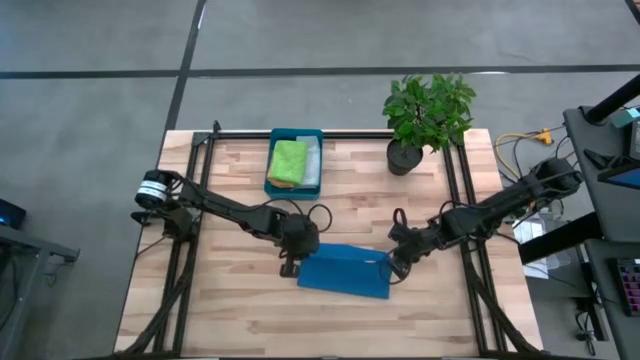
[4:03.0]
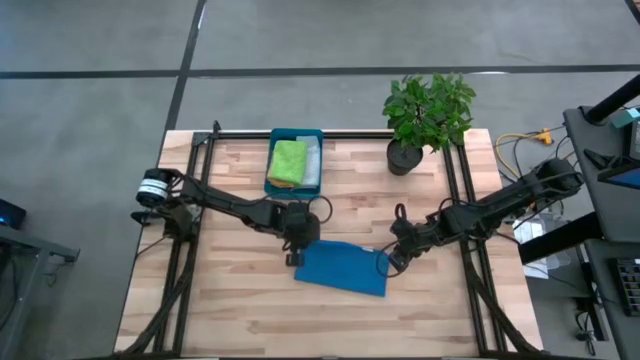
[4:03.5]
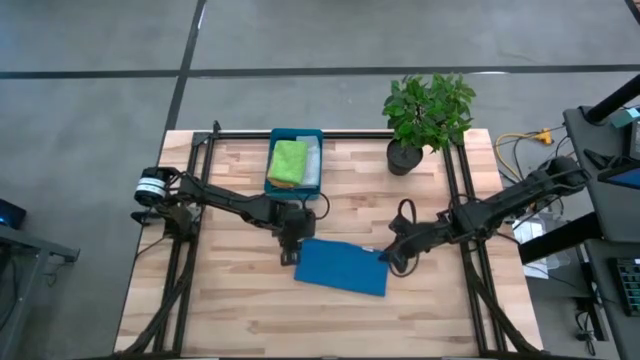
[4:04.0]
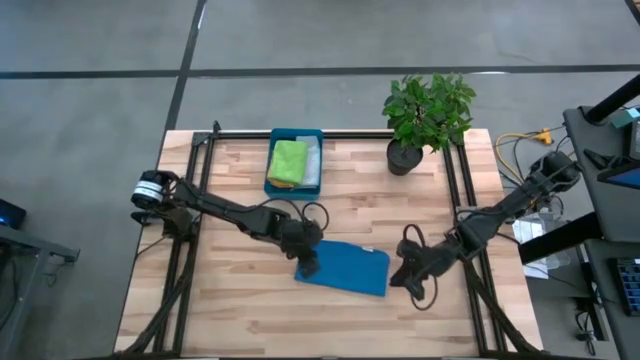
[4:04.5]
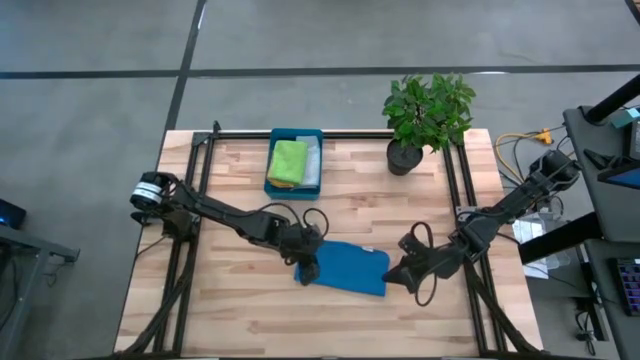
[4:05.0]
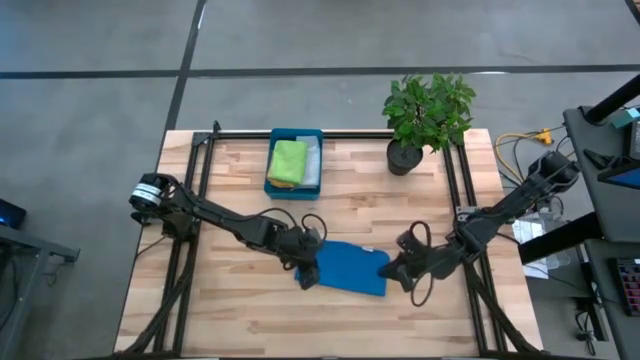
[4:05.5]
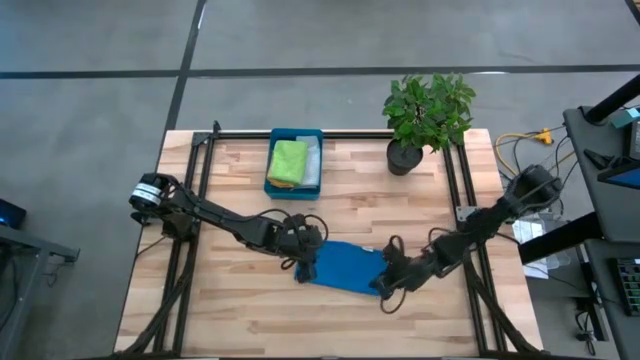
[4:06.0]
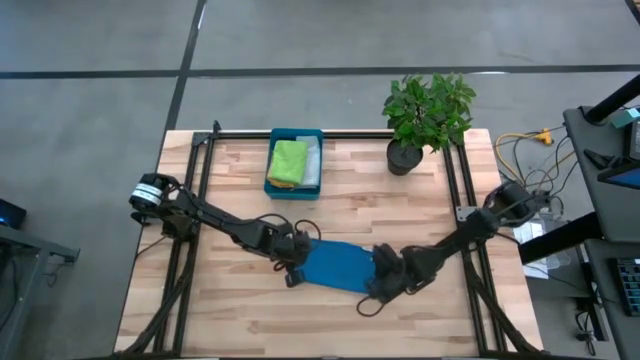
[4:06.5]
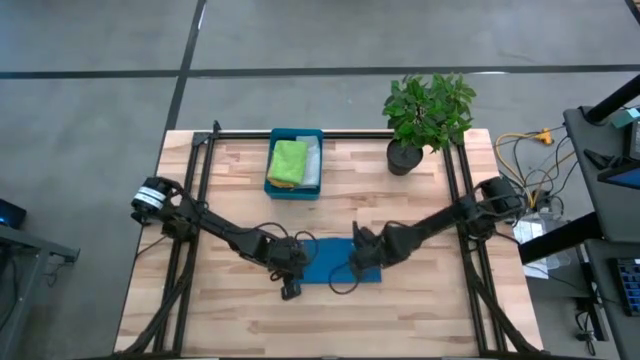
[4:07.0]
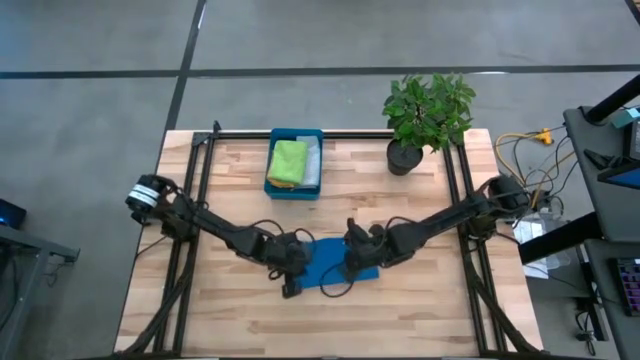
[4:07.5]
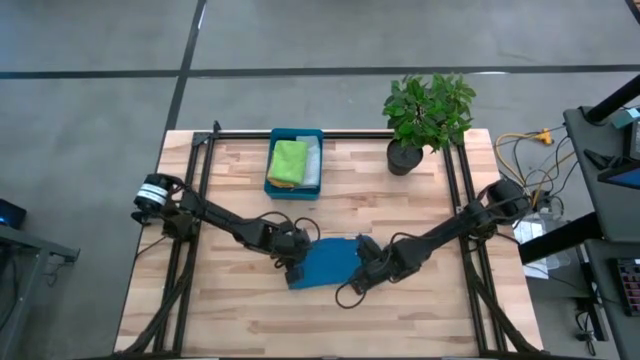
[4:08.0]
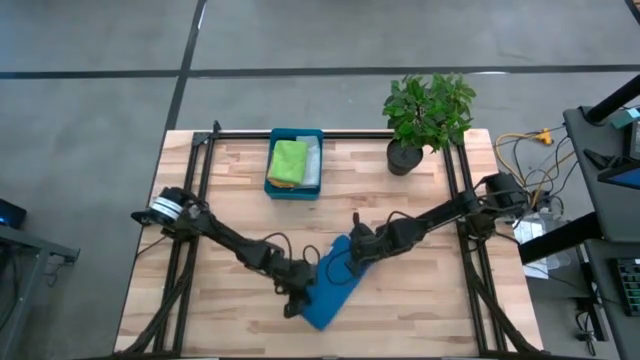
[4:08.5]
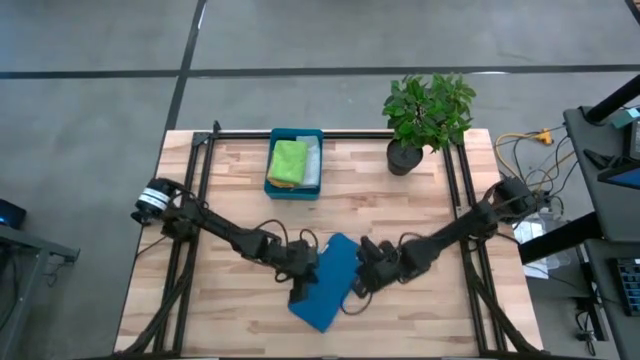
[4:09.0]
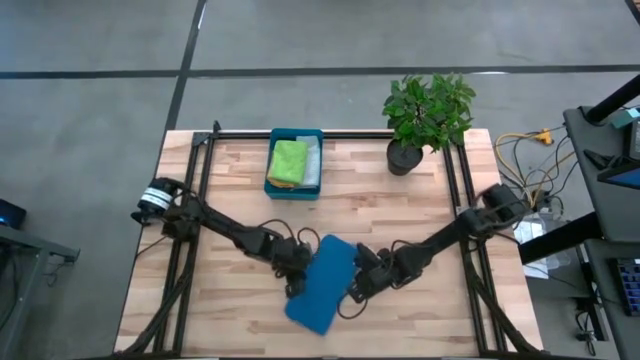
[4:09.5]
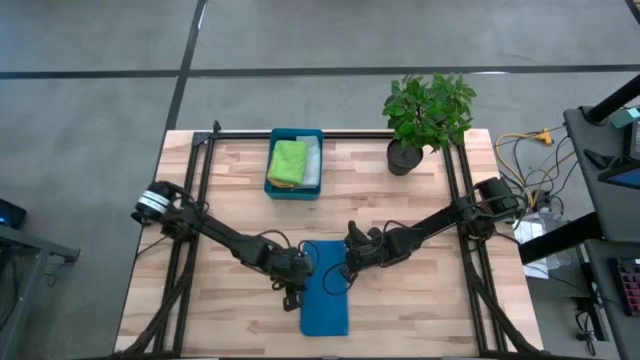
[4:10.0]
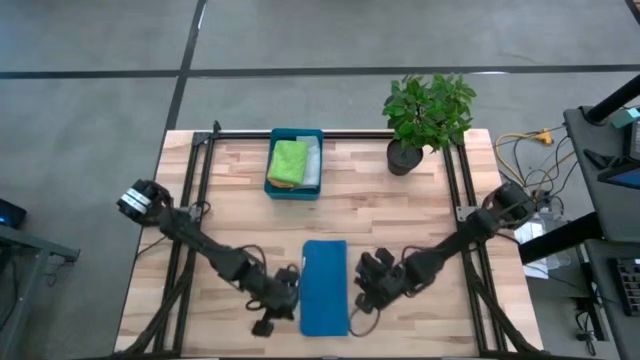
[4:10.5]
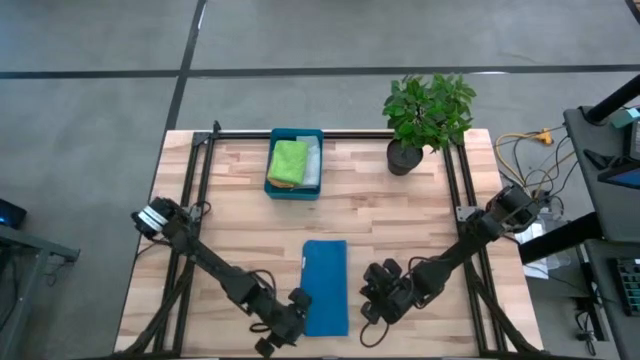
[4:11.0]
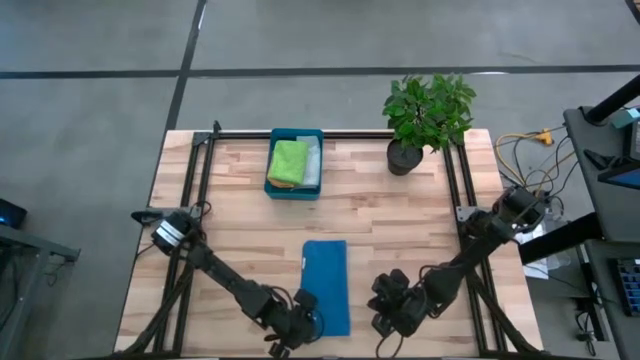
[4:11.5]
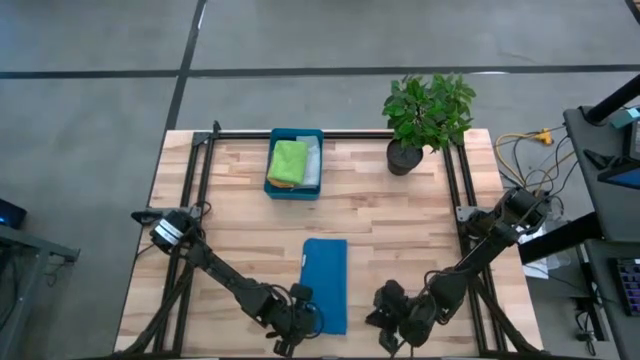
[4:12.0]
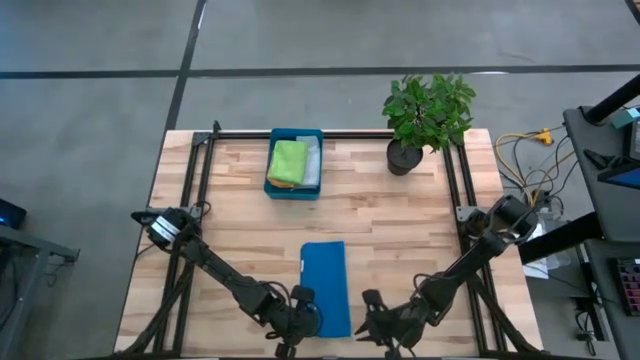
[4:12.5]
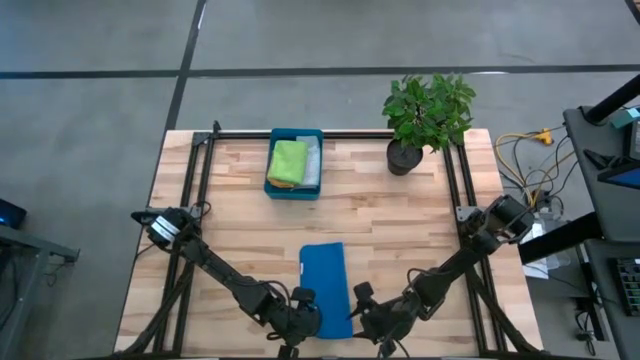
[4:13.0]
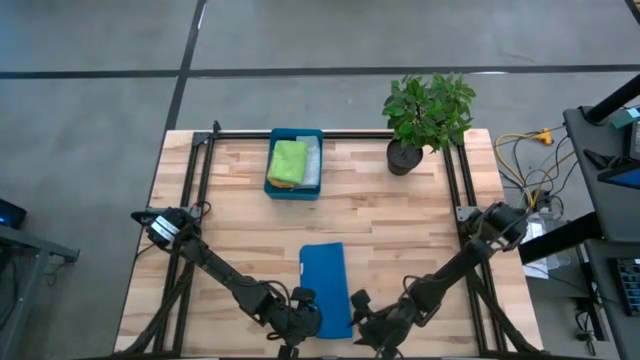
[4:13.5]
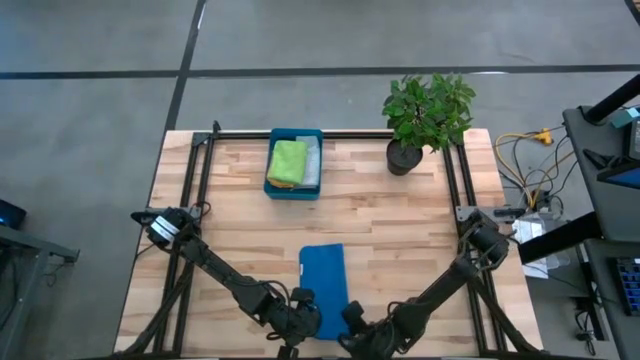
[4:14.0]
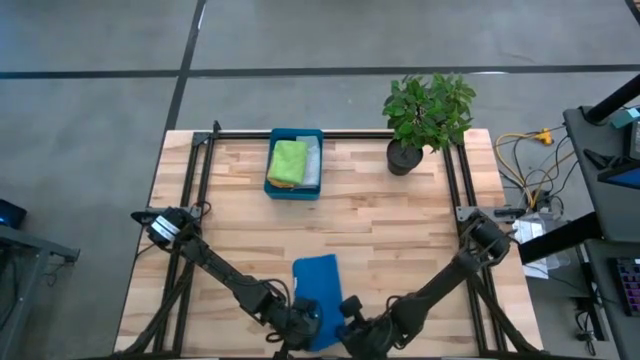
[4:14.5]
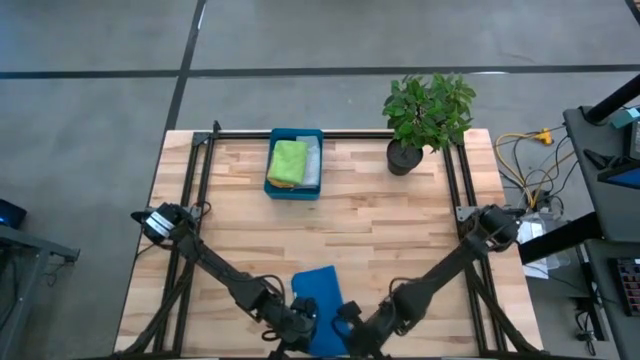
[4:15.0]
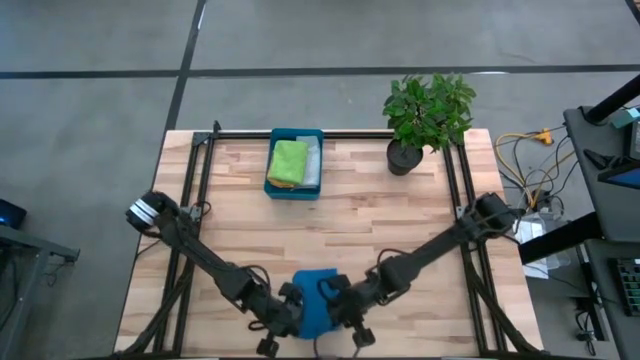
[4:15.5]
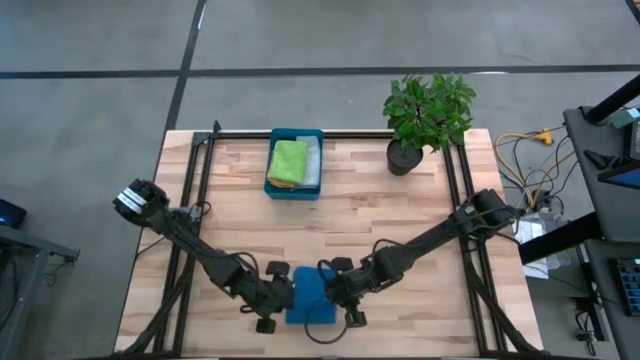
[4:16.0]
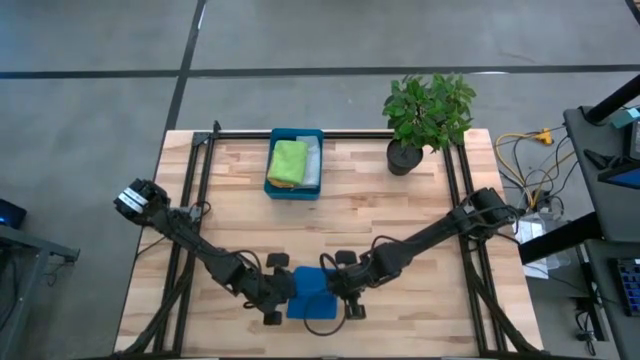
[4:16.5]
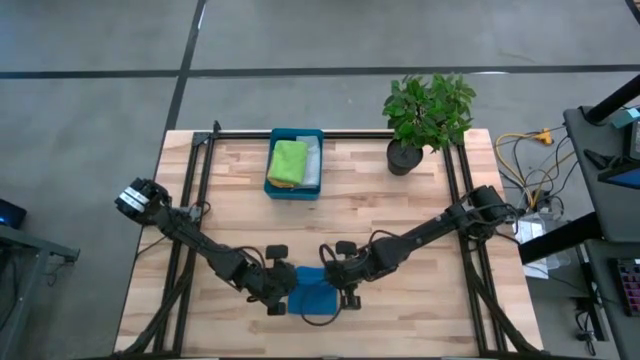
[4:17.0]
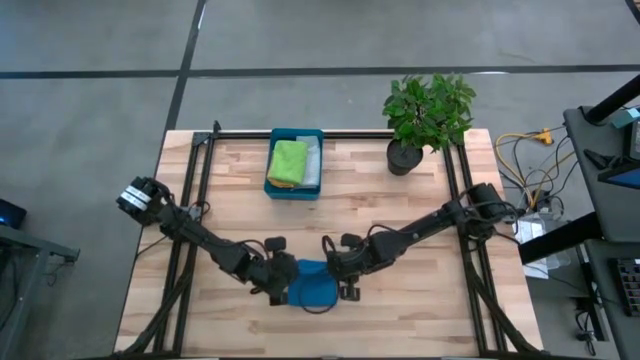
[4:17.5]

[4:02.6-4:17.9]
Task: Fold microfiber towels
Fold the blue microfiber cloth

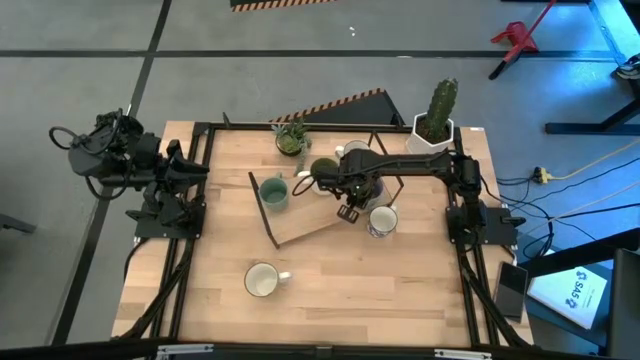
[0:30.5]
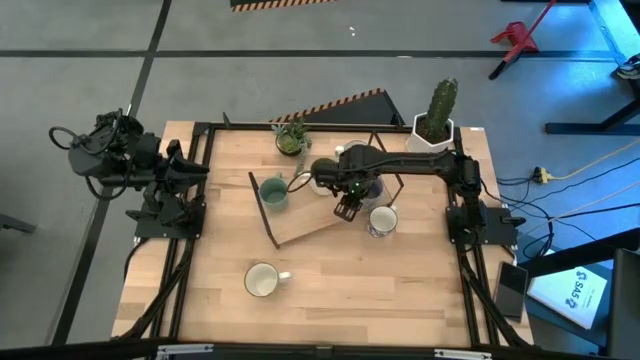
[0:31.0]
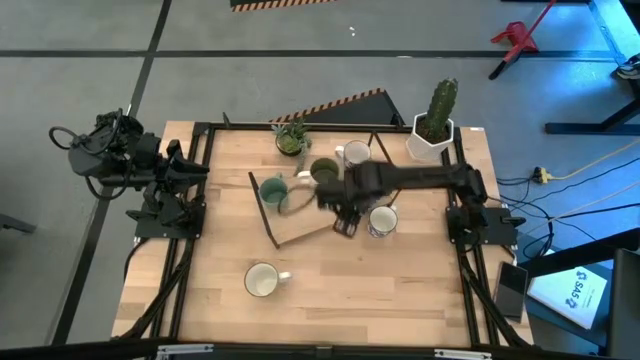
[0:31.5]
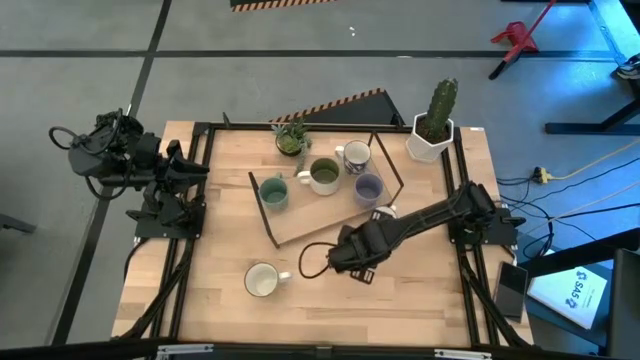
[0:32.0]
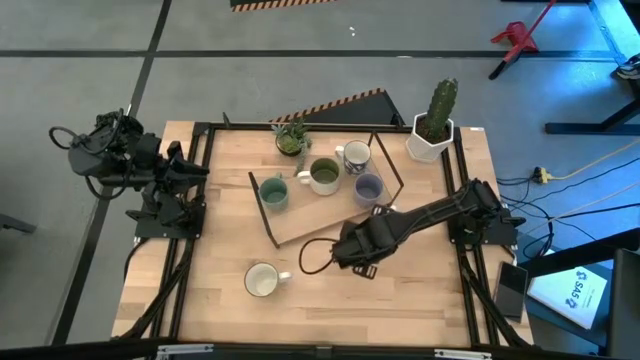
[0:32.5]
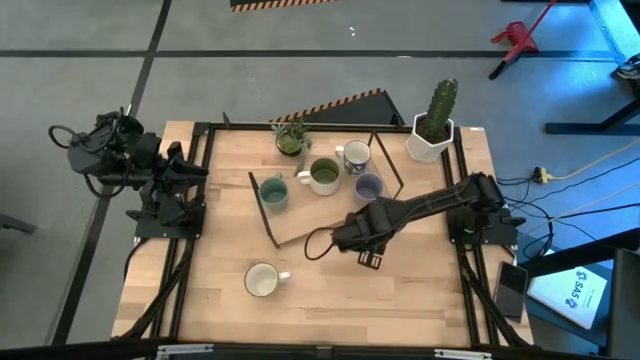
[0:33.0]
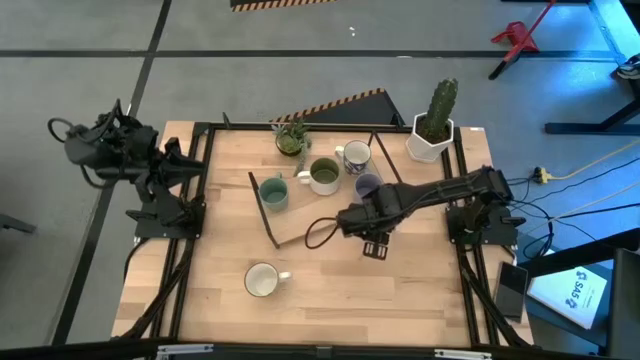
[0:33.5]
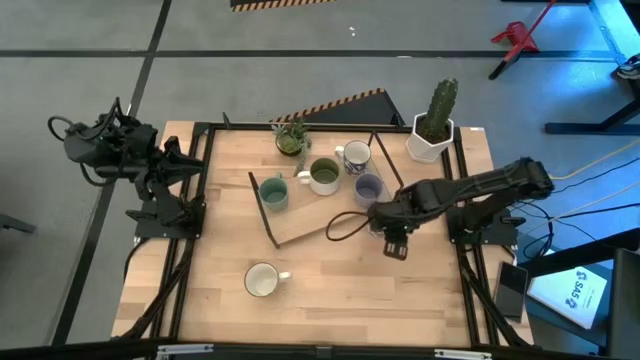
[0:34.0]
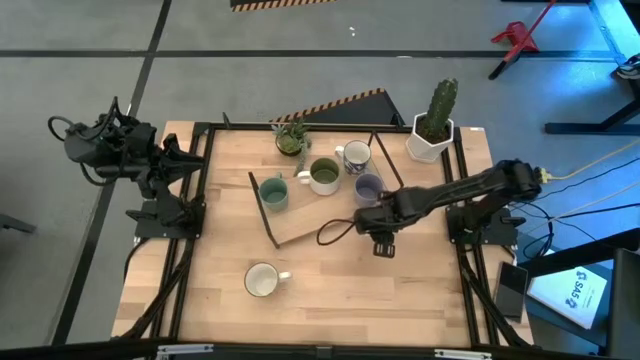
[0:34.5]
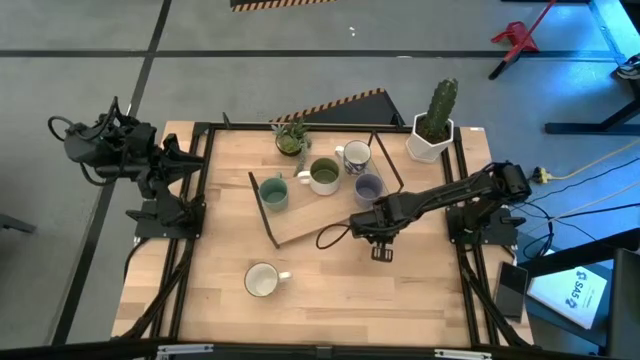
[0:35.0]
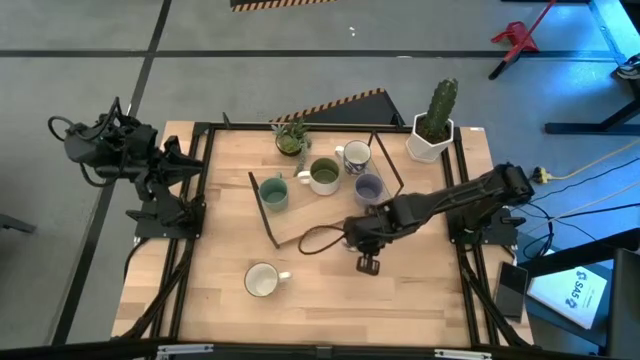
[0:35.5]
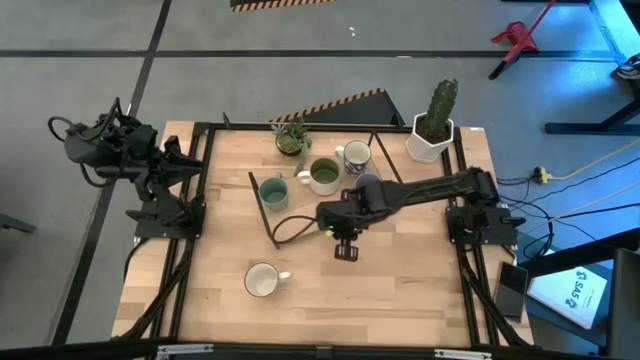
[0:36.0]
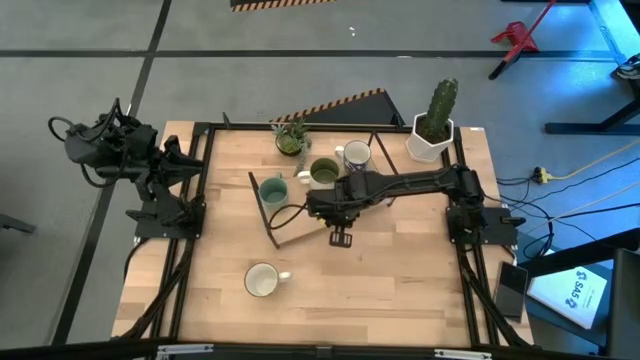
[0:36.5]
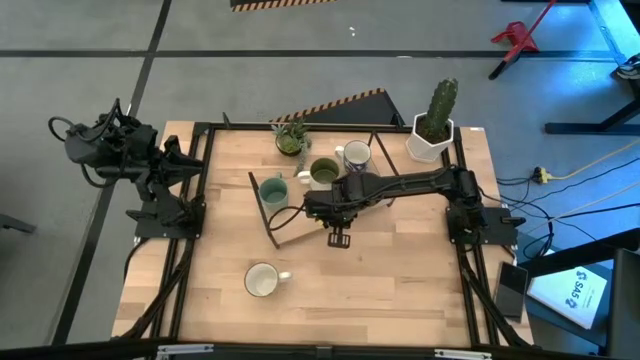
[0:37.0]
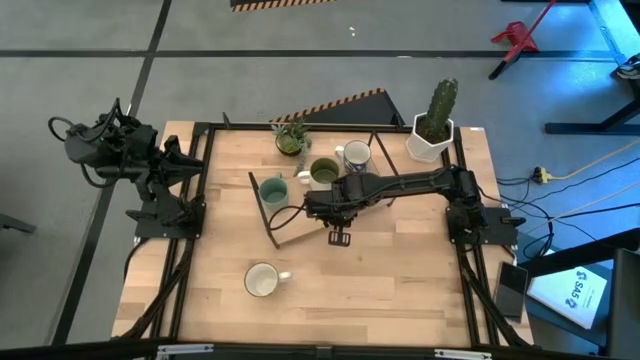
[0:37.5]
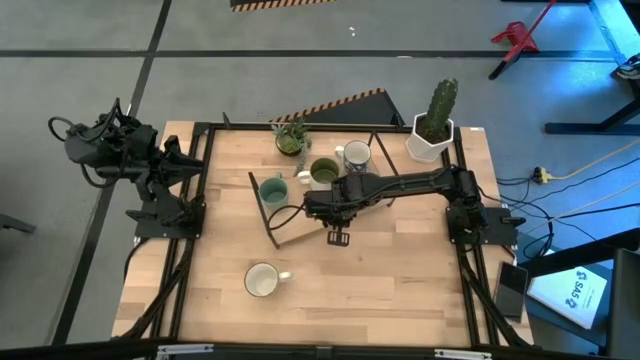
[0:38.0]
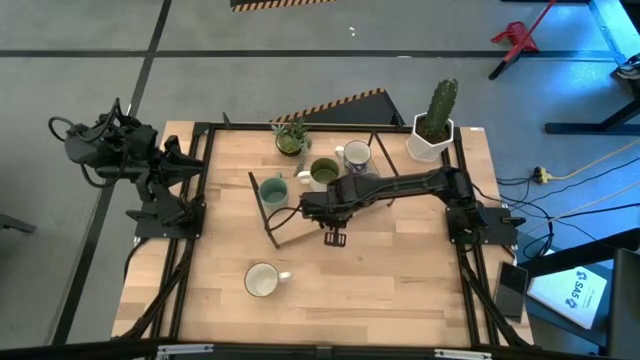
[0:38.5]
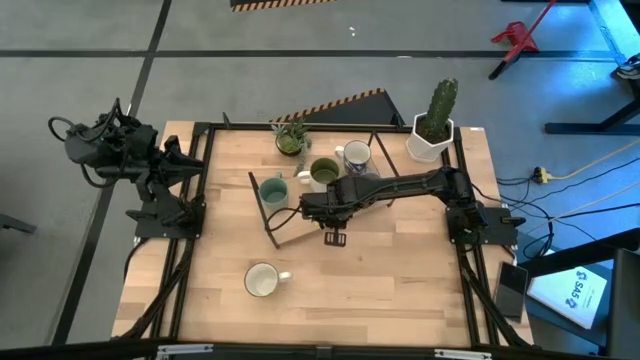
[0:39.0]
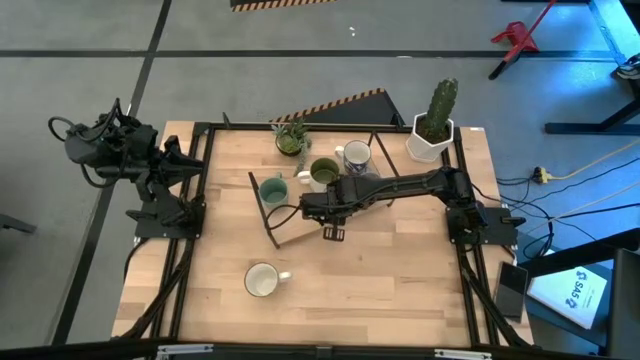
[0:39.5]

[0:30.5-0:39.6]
Task: Place coffee mugs
Put the blue patterned mug on the shelf
